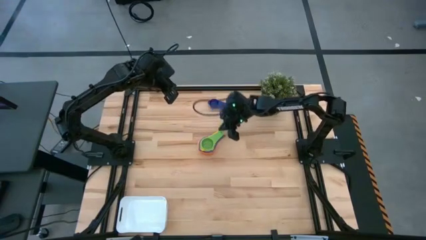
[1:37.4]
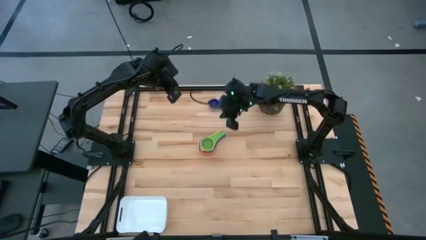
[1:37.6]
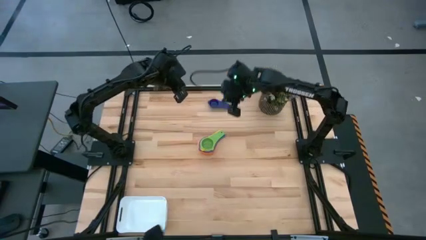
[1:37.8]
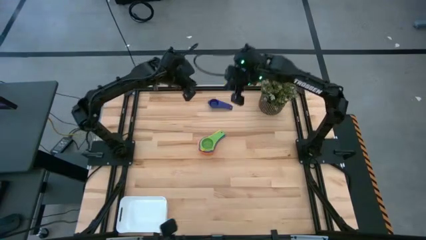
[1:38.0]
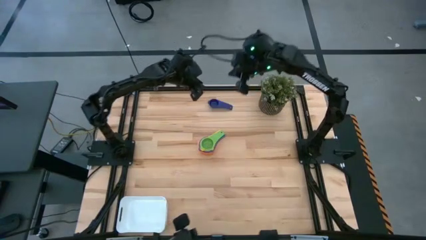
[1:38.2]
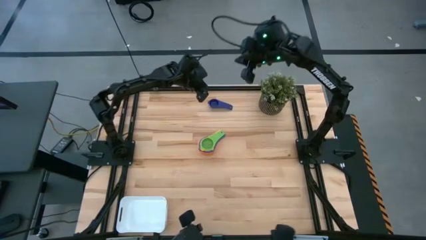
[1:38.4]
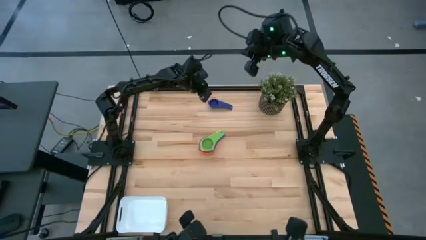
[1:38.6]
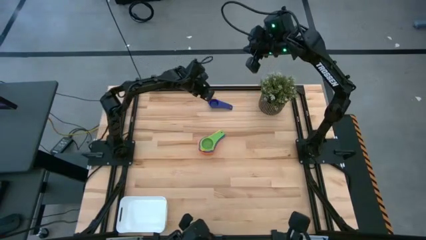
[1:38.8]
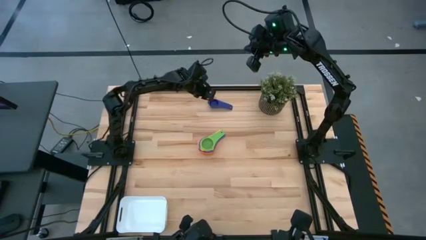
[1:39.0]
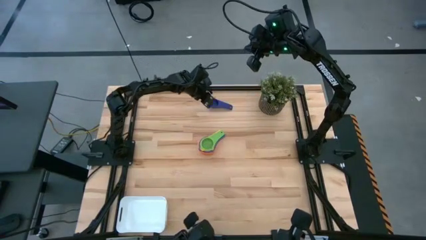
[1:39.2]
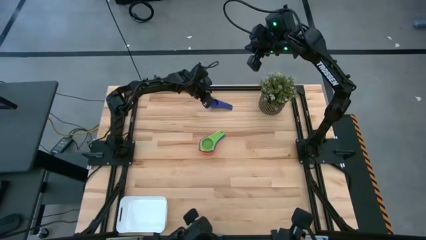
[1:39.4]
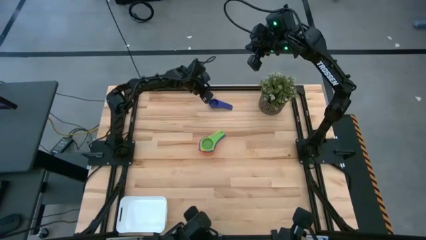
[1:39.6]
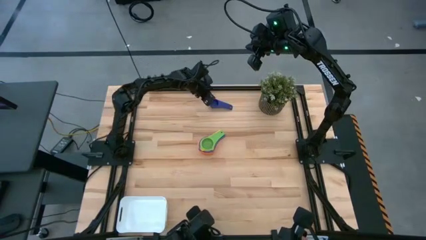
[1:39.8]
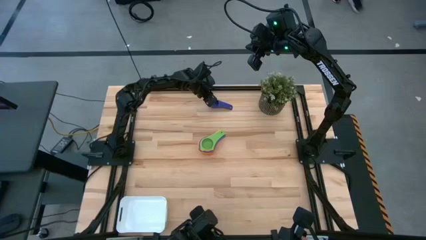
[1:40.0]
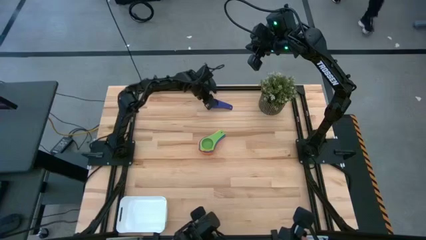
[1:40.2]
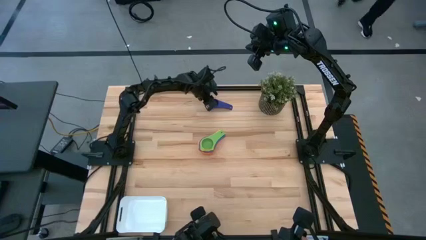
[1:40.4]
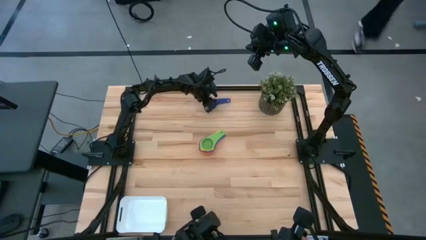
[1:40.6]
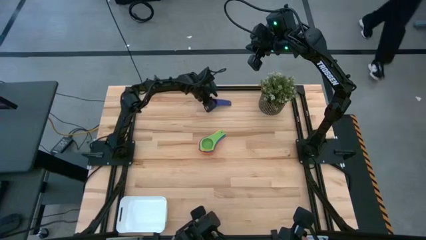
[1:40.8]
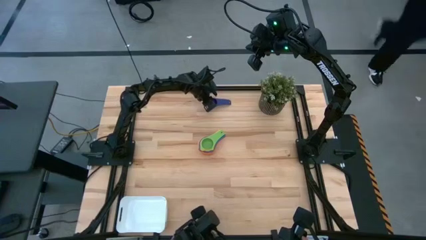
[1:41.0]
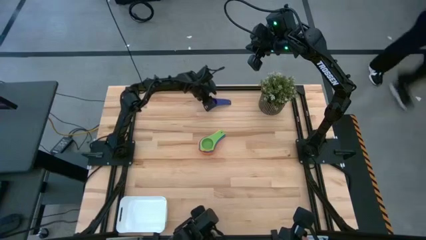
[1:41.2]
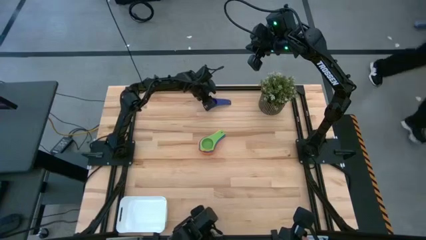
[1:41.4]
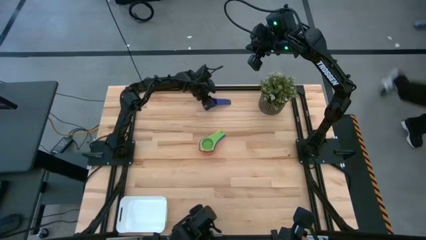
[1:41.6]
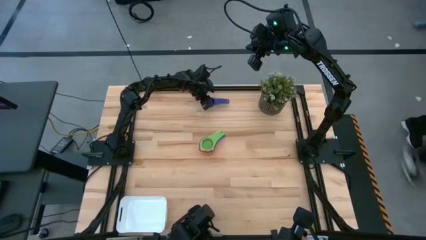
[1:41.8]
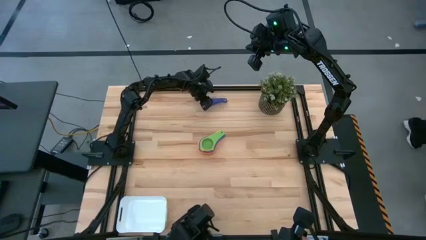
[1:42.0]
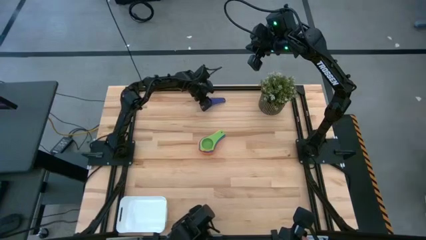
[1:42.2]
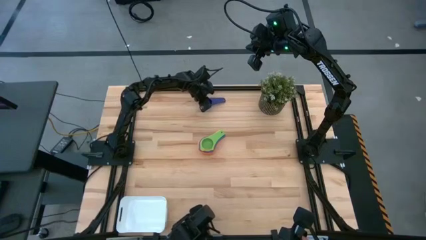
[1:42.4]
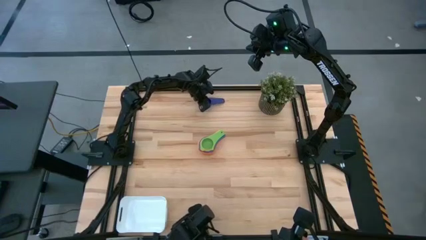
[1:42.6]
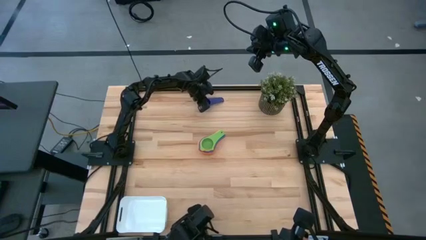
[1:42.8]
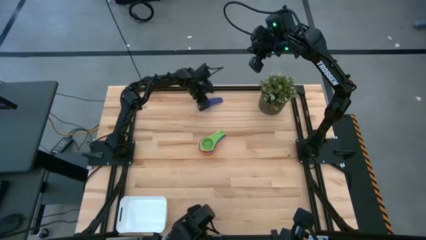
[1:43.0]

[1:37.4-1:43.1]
Task: Nest measuring cups in basket
Stack the violet measuring cup into the green measuring cup

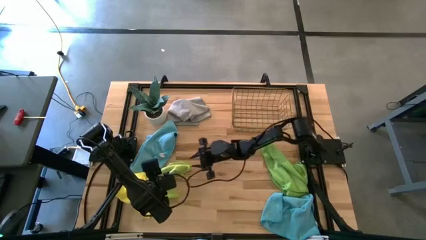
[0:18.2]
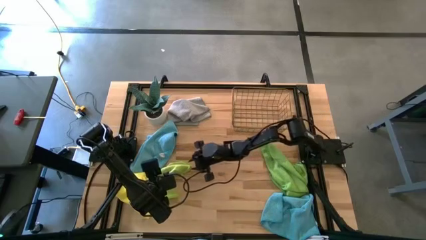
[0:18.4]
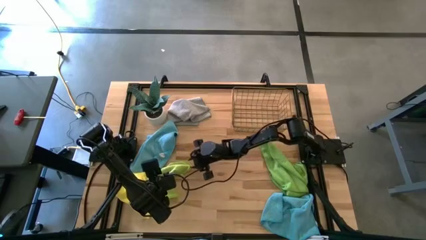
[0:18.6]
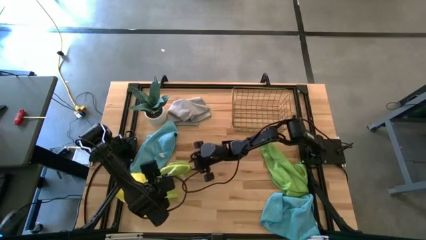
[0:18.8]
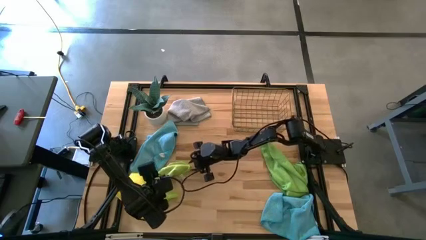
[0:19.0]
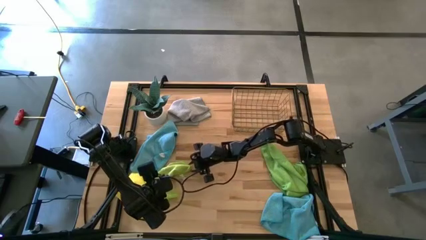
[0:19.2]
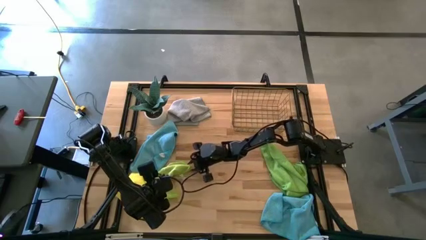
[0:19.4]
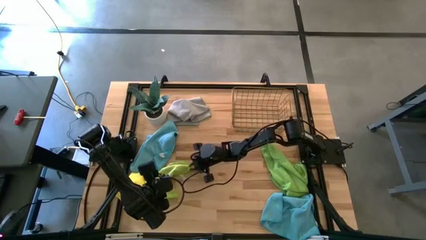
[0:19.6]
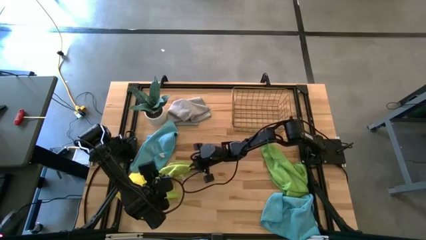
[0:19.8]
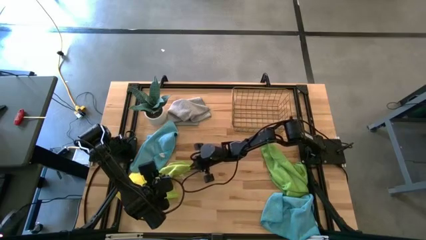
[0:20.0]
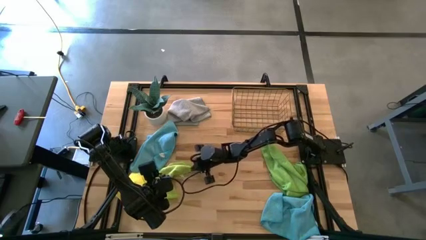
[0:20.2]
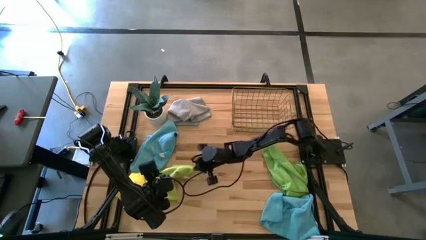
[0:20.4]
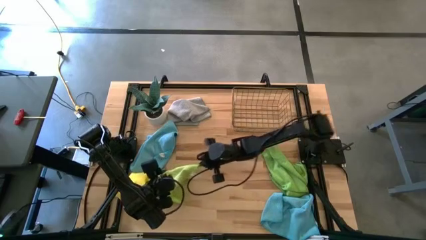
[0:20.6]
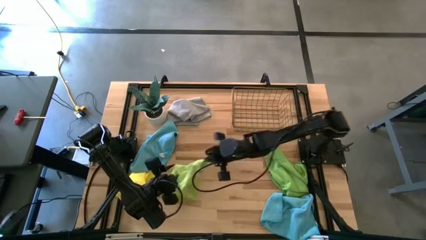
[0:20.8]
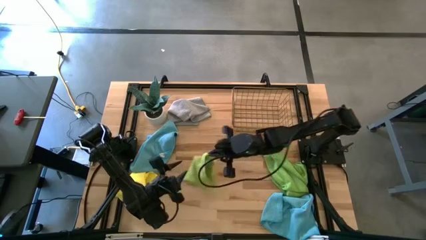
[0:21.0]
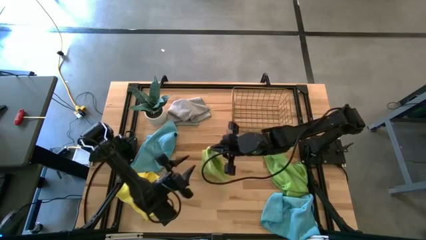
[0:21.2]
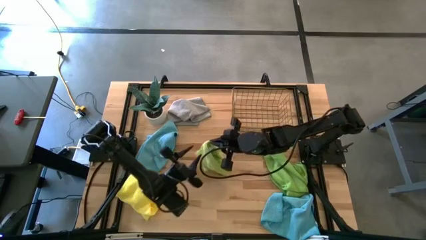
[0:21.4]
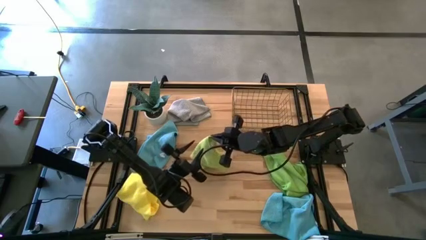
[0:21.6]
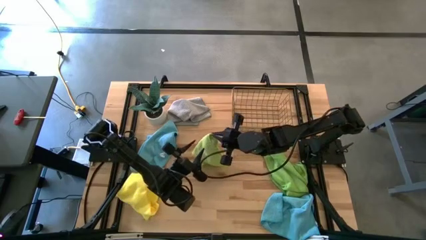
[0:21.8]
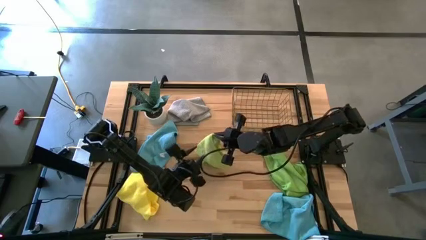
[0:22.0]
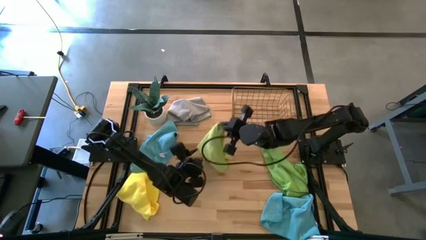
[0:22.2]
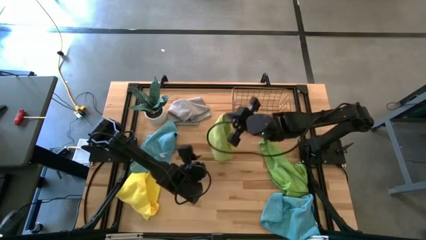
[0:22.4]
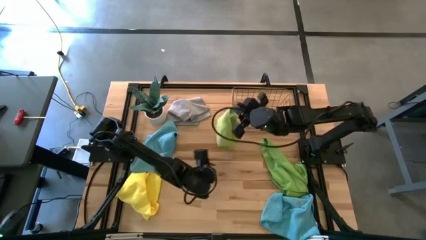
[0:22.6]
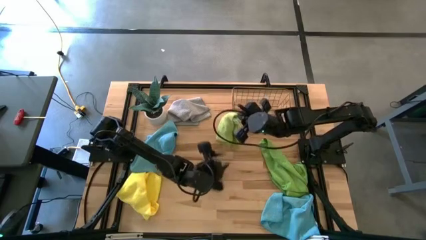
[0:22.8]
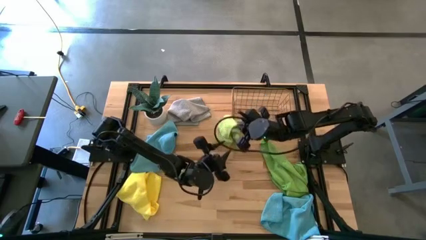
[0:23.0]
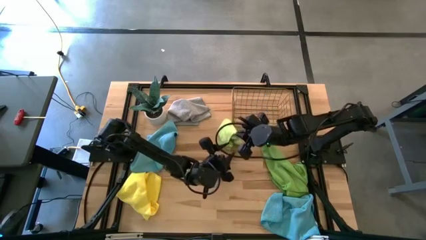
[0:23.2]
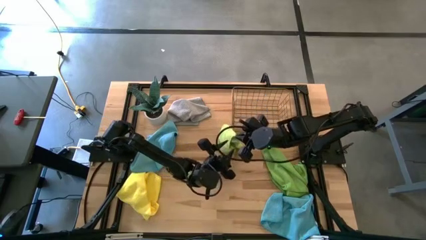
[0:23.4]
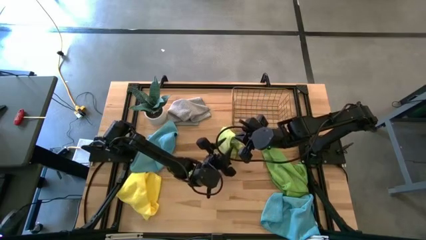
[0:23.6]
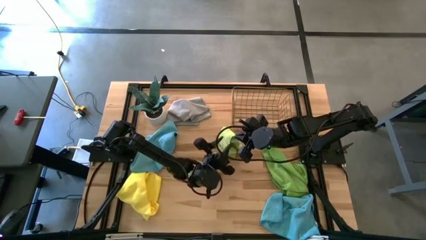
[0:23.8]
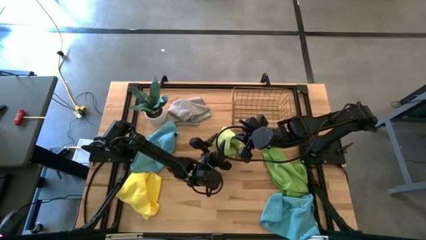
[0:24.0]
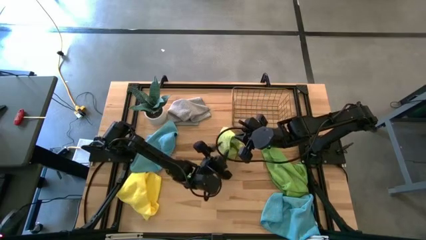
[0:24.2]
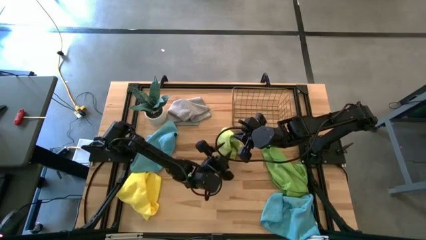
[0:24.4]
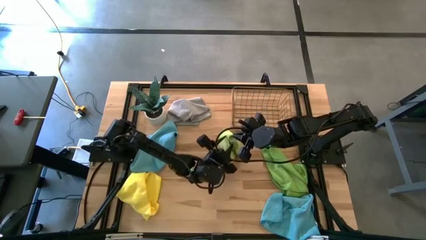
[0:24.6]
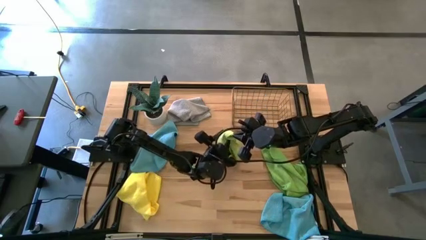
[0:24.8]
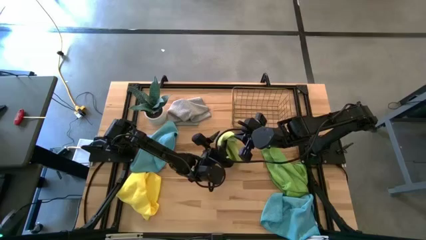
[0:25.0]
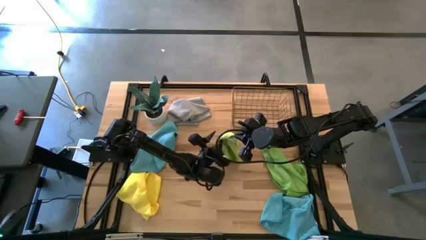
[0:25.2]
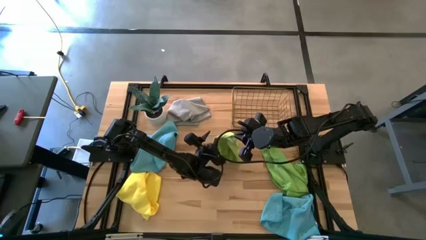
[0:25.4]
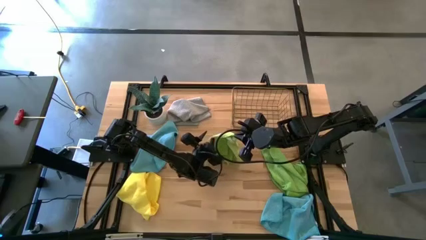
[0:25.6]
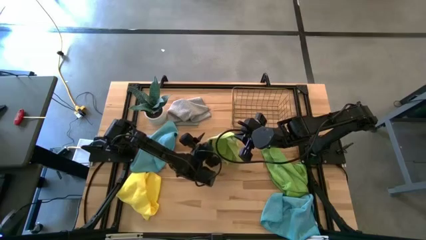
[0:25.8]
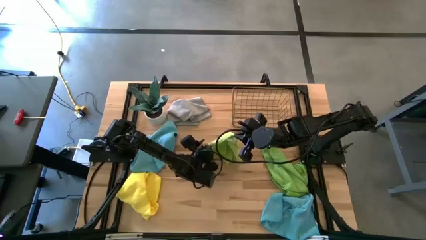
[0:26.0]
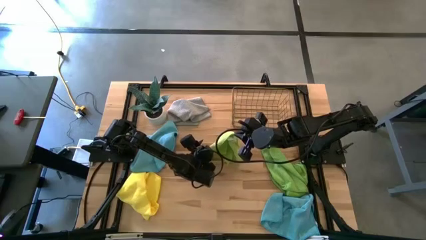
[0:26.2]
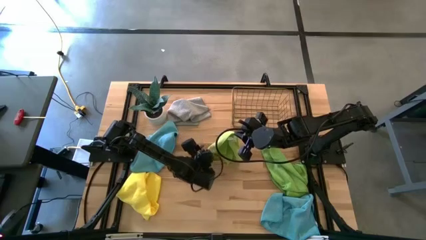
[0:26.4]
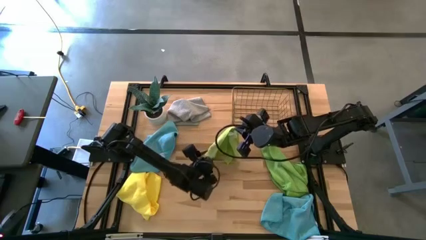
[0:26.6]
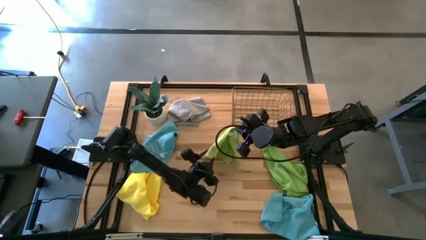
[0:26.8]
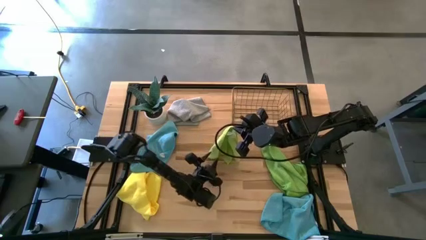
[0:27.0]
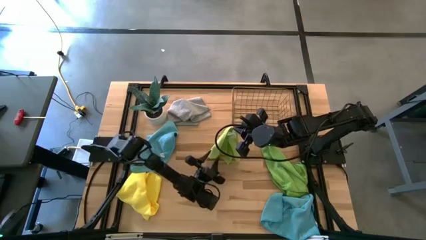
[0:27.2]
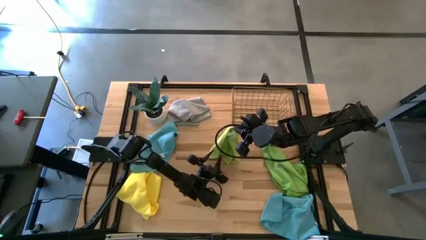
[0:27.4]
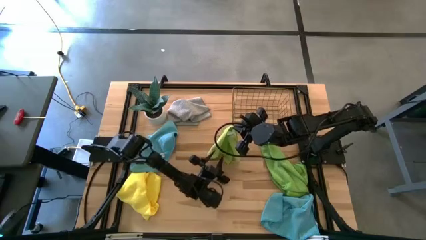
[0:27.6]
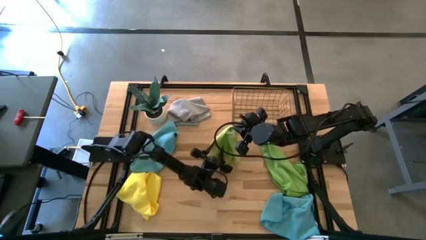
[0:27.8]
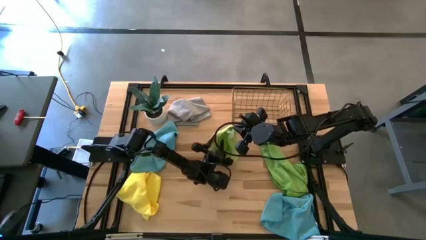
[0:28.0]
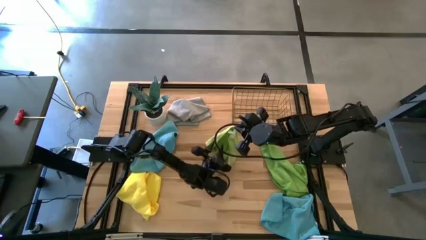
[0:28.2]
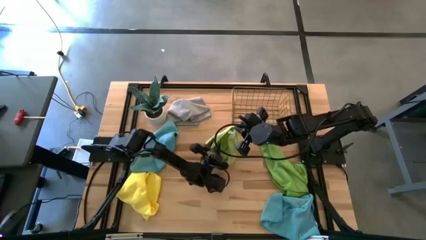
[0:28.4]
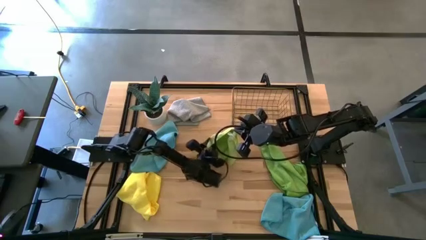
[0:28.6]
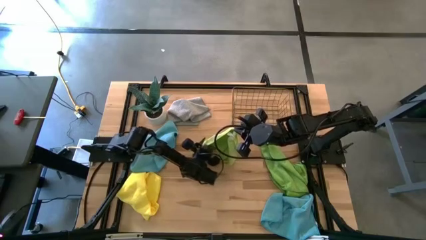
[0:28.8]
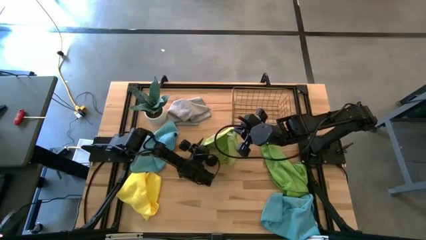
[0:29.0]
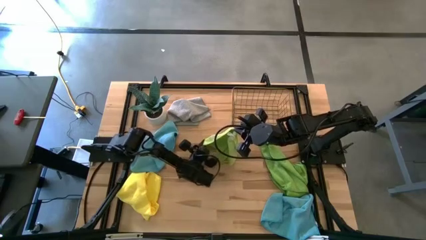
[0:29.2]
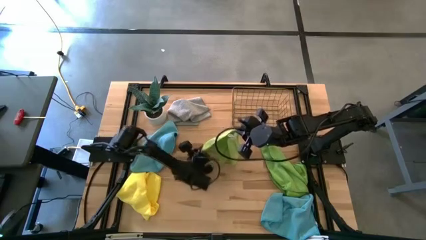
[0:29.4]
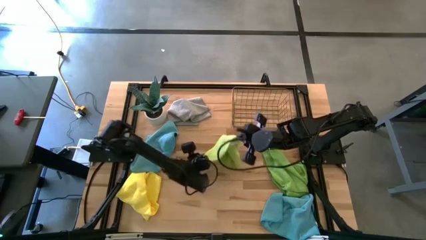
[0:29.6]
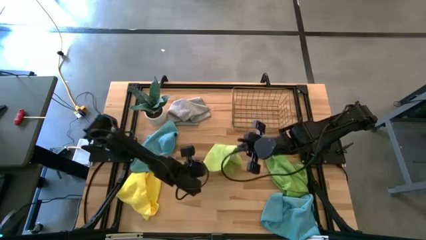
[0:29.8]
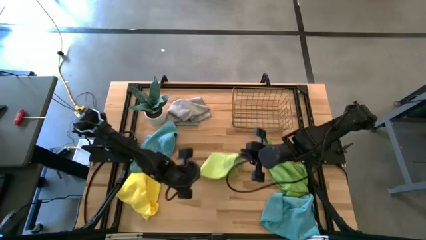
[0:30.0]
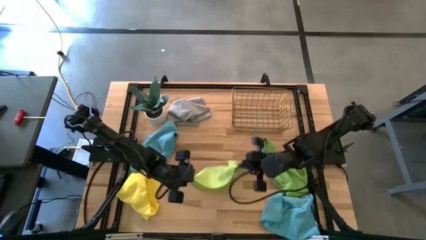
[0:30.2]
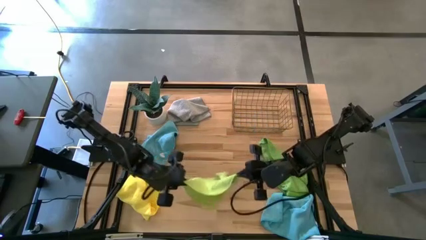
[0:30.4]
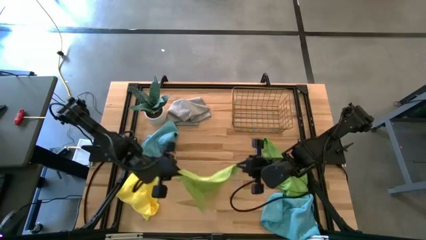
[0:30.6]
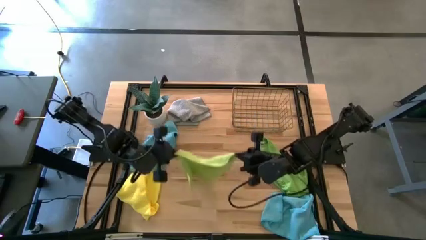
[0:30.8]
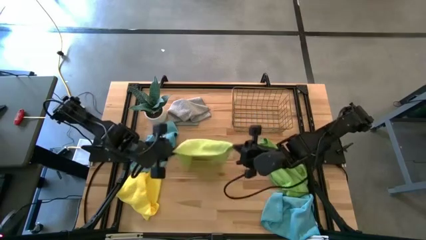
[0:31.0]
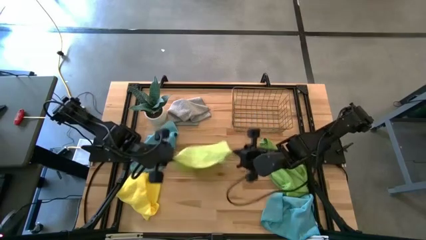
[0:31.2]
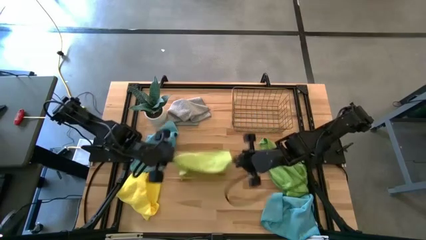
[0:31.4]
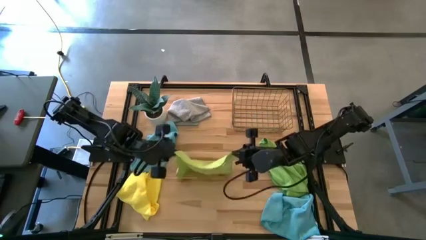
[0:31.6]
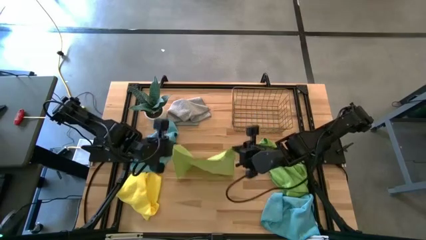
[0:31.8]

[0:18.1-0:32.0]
Task: Fold microfiber towels
Fold the light green microfiber towel
